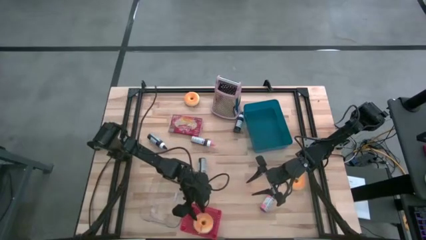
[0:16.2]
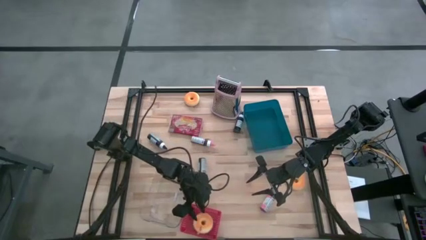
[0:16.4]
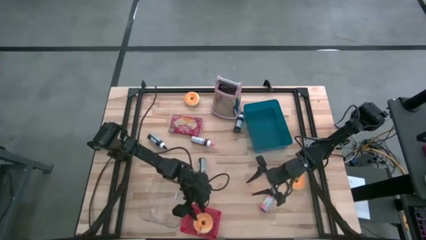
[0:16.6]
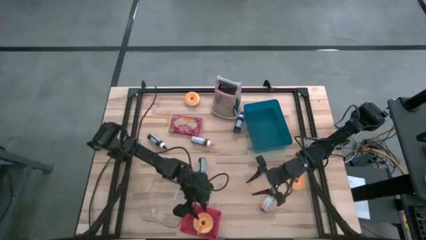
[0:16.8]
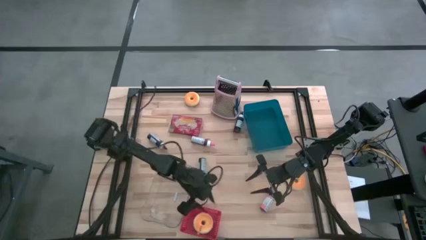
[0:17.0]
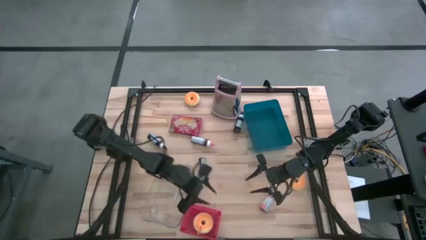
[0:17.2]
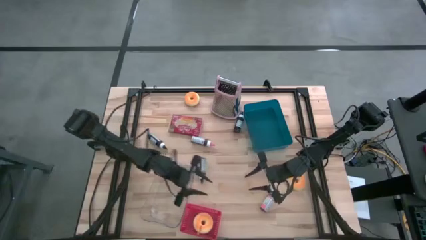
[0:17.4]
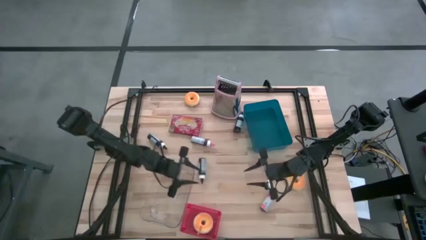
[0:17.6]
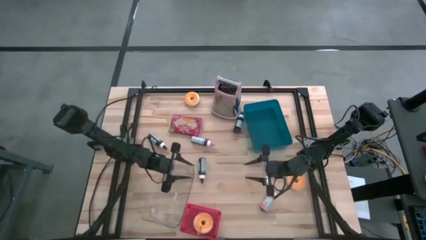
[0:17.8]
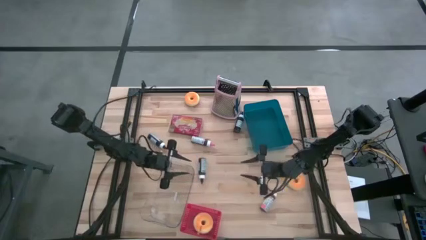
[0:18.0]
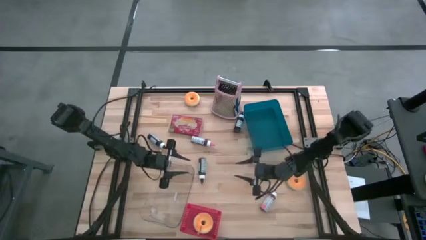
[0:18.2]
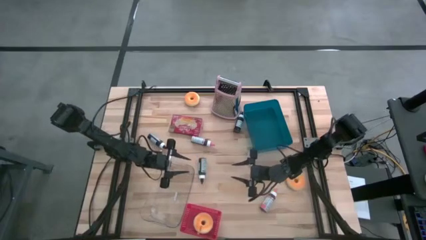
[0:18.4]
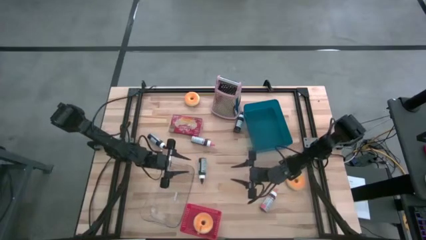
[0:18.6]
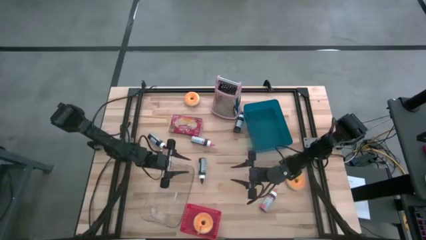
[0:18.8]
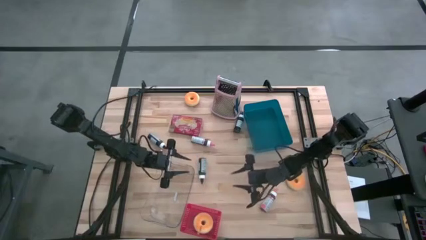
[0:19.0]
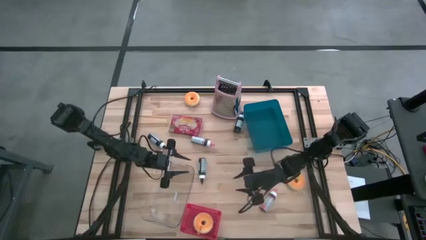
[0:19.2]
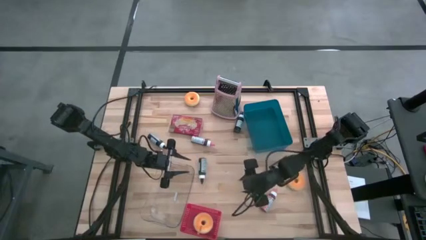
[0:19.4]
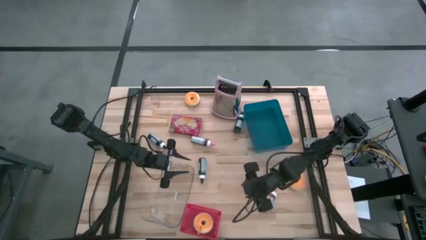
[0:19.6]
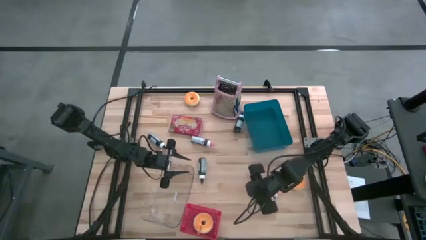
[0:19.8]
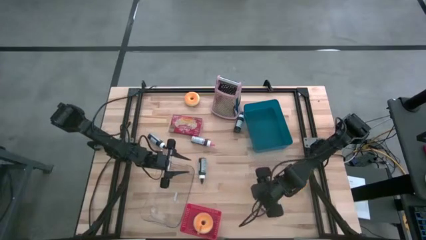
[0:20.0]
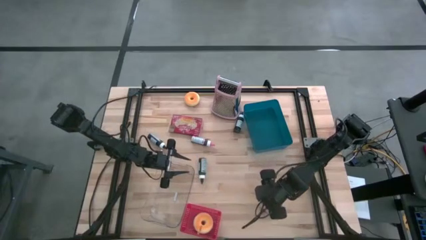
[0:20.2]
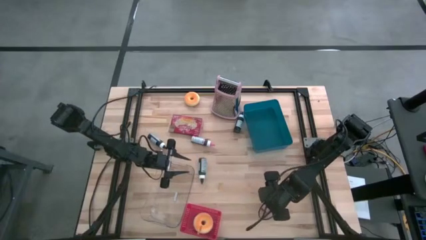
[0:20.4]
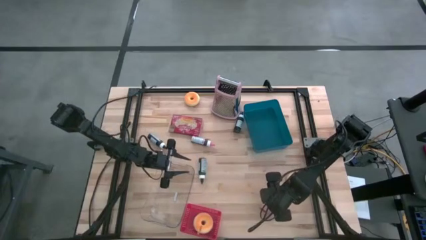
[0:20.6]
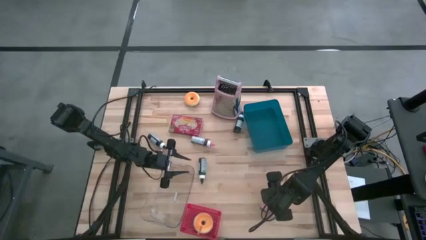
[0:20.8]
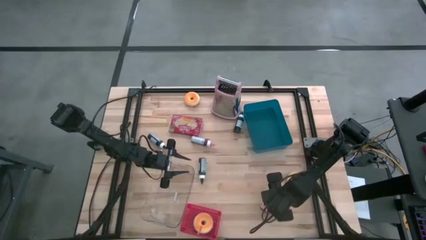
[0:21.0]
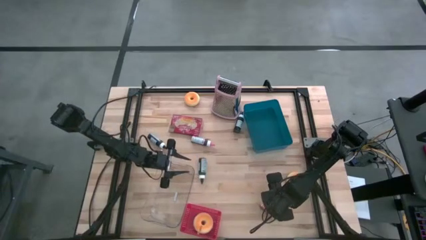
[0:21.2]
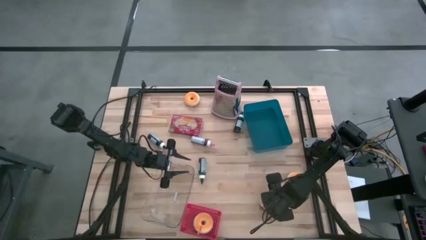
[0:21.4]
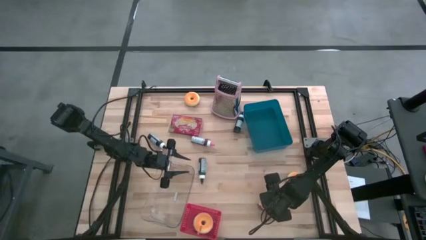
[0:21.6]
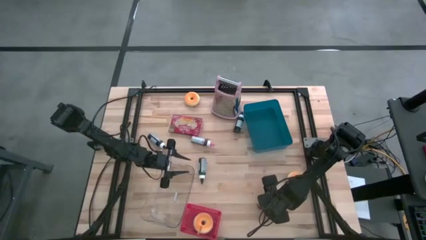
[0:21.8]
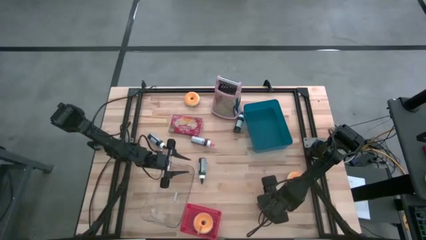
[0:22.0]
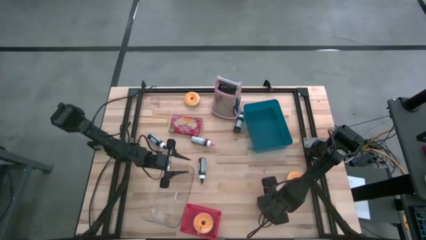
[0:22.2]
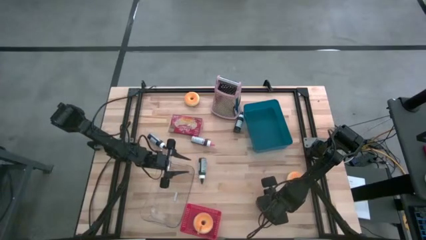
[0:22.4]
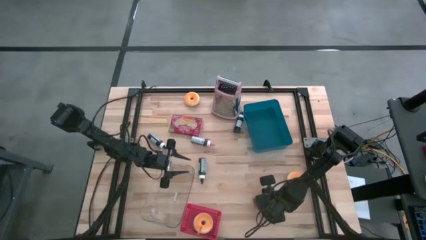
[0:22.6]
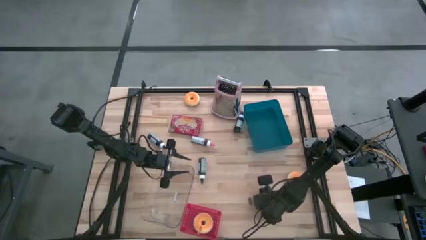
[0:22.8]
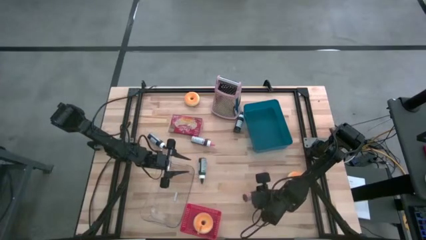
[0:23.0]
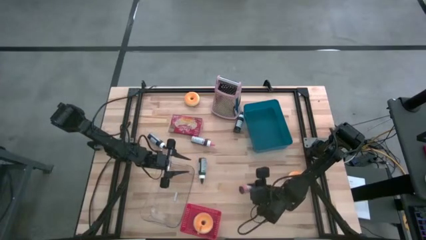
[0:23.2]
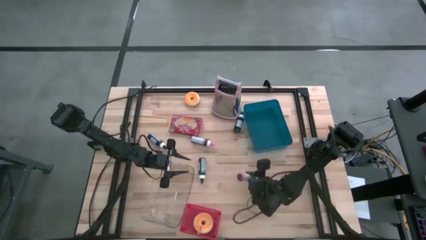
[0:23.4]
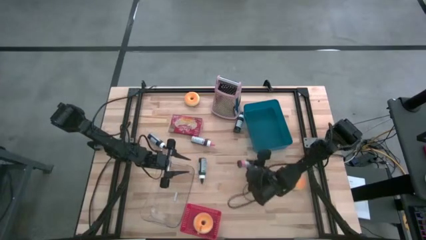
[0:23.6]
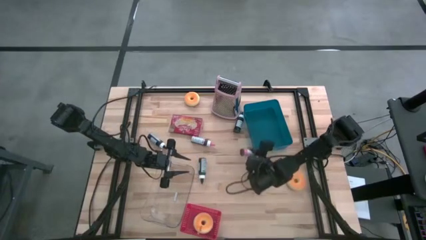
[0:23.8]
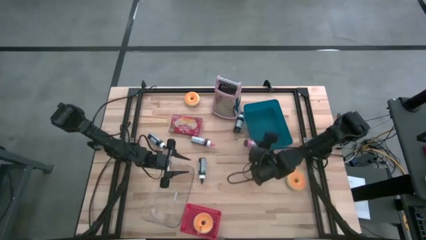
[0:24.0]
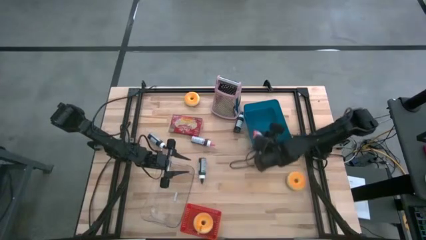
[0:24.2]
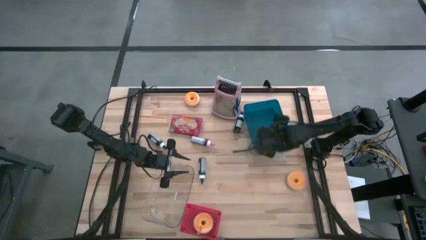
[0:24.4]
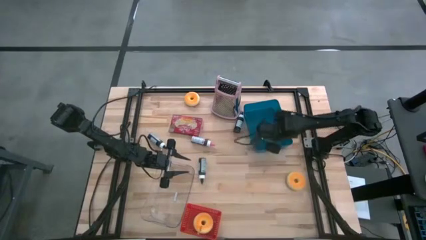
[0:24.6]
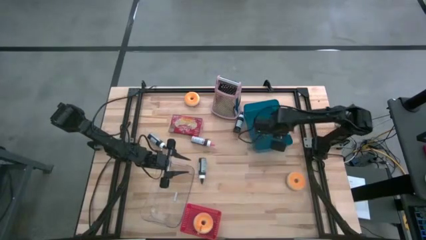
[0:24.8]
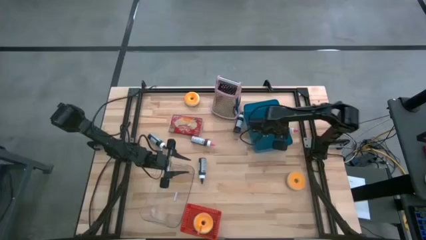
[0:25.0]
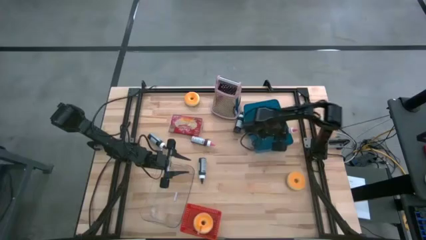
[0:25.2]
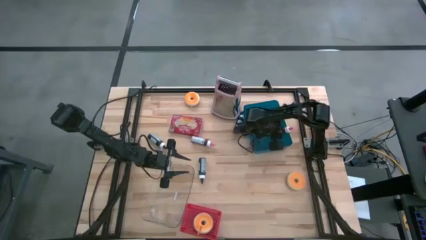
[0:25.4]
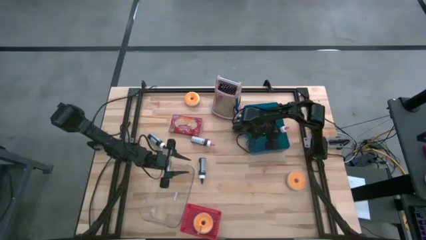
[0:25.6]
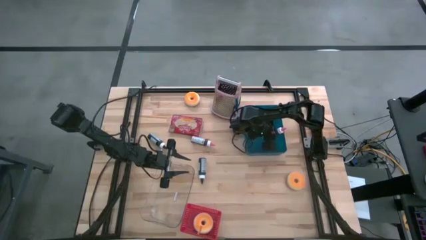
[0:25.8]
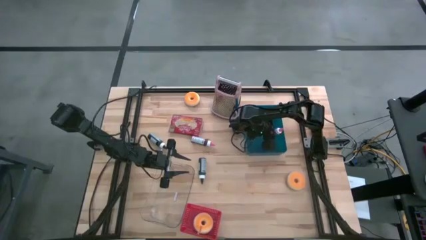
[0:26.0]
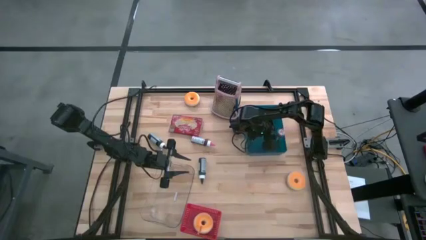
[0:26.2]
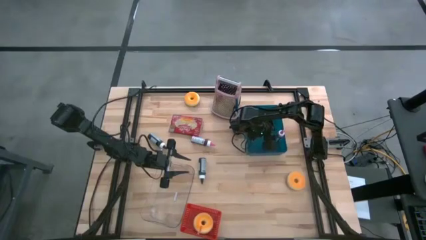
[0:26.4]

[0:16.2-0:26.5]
Task: Pick & Place Food Item
Put the bottom pink food coloring bottle into the blue bin
